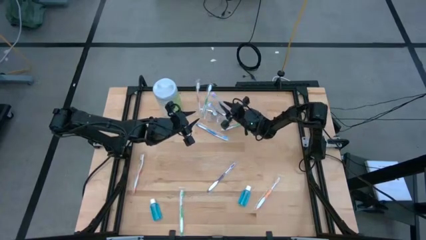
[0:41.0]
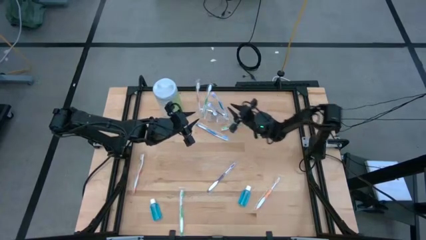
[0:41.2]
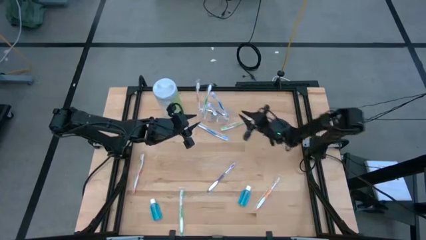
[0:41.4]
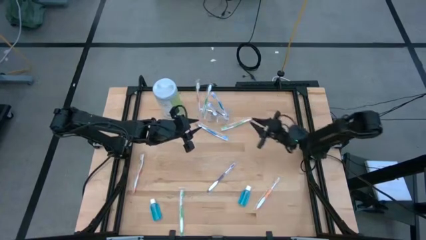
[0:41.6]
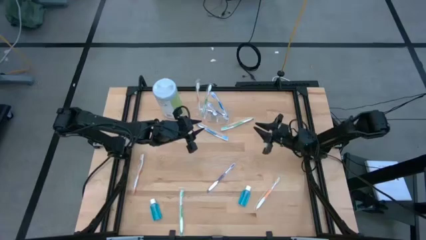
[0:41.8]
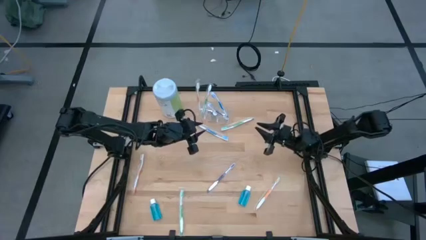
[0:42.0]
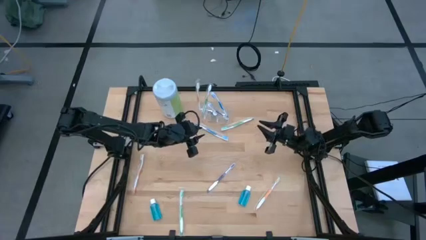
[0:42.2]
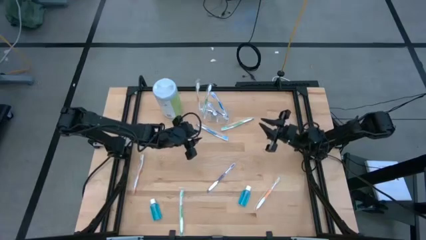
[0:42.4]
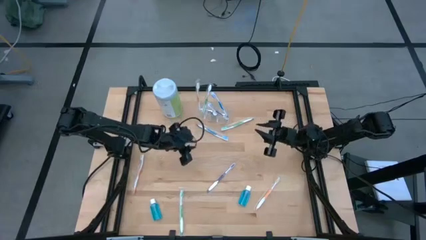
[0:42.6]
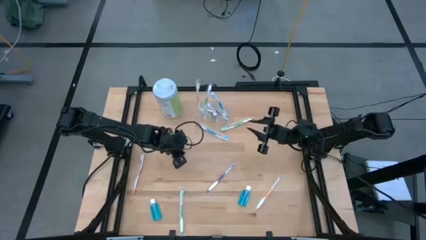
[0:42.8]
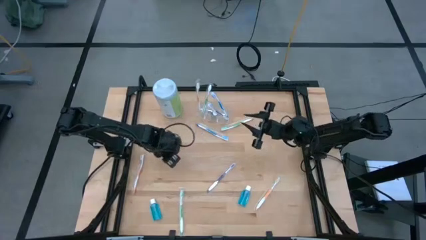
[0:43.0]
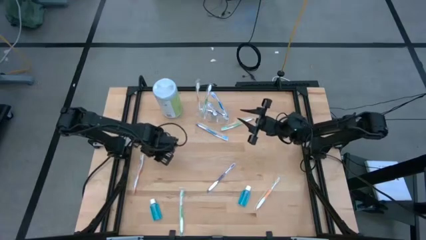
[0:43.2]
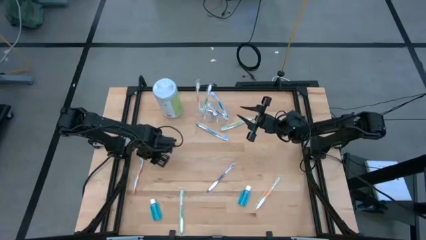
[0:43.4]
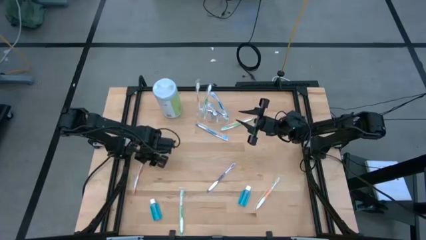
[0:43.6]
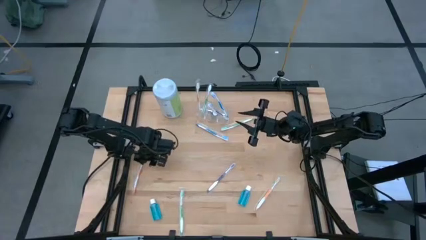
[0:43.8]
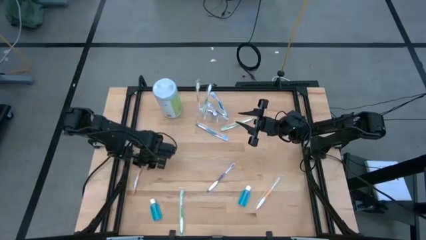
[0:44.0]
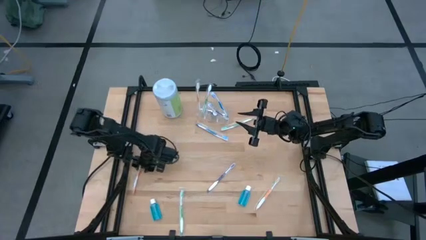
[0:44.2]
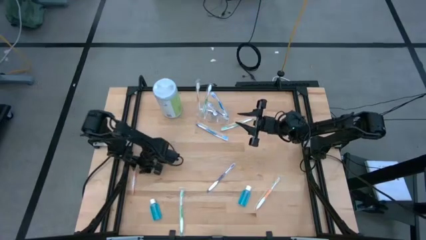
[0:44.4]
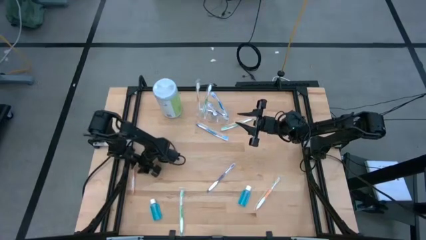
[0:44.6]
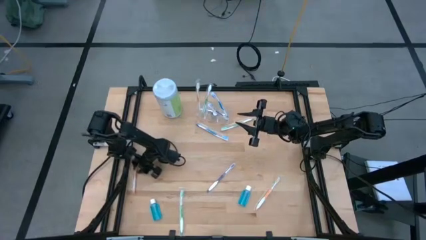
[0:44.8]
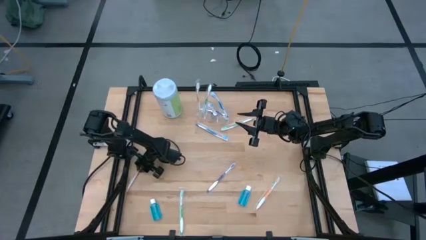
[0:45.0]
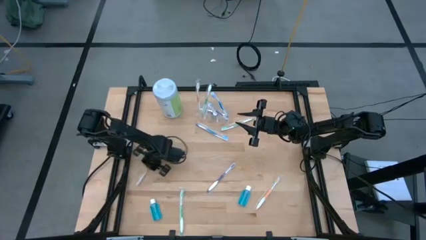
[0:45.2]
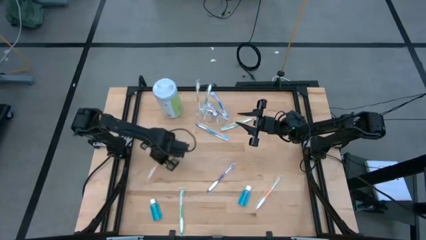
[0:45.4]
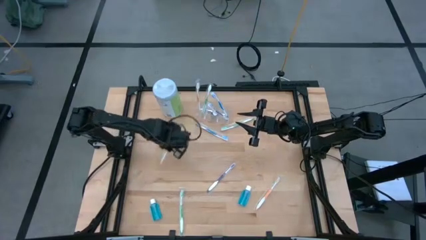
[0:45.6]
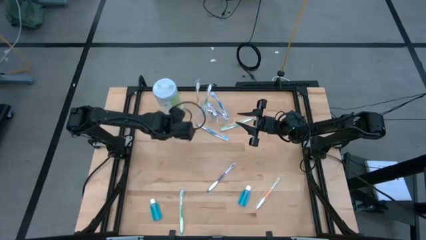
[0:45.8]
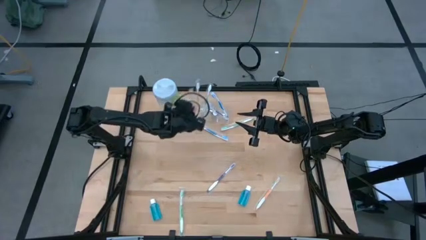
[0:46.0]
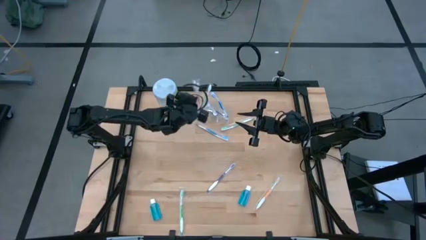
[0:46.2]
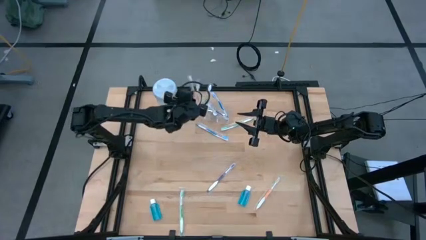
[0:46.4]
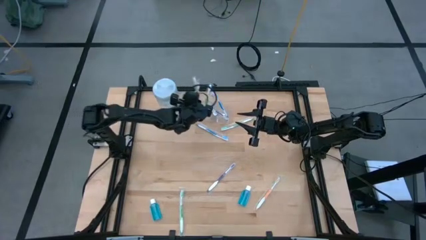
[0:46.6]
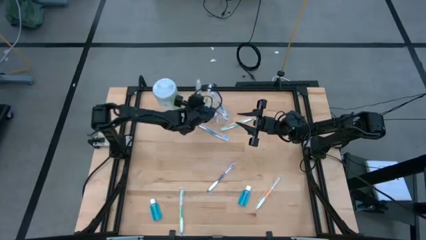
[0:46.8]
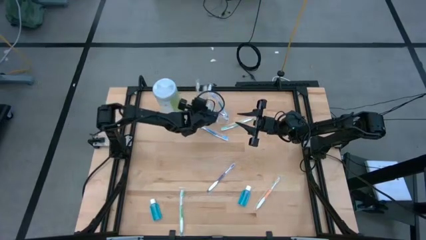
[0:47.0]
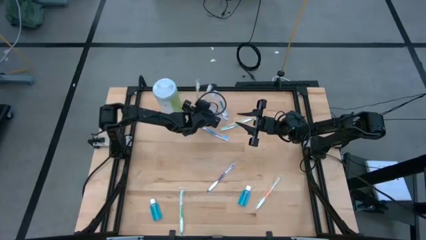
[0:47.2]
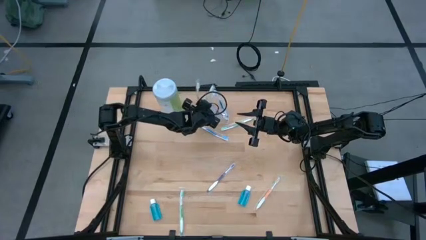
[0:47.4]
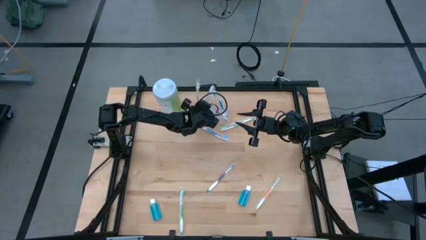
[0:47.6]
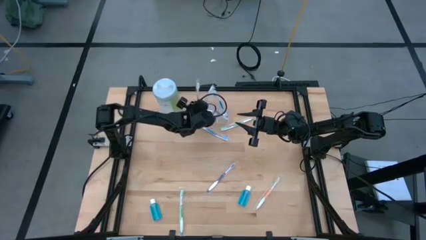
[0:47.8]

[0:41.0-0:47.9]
Task: Pick & Place toothbrushing station
Put the left orange toothbrush into the transparent organizer

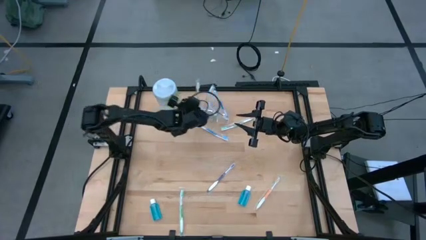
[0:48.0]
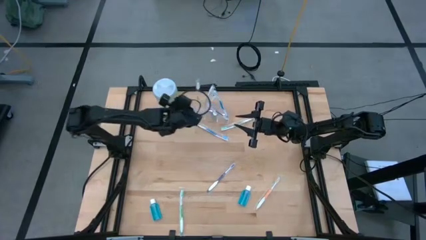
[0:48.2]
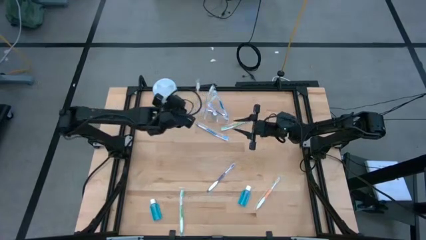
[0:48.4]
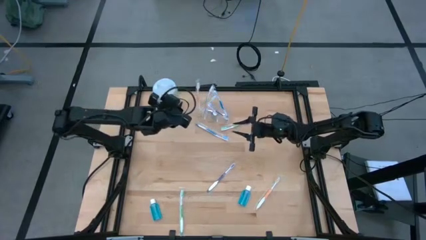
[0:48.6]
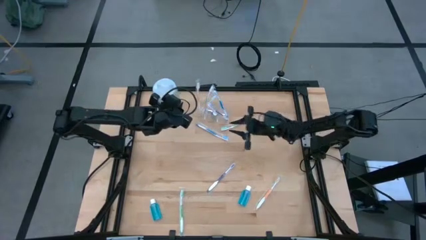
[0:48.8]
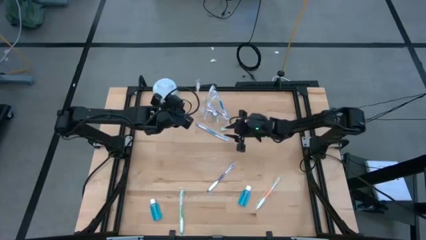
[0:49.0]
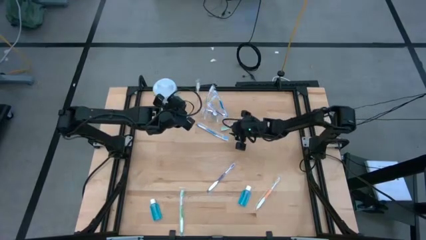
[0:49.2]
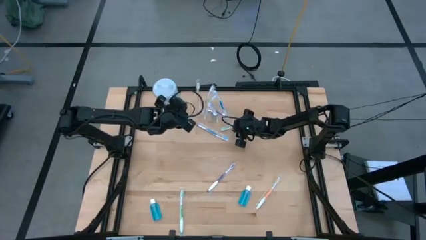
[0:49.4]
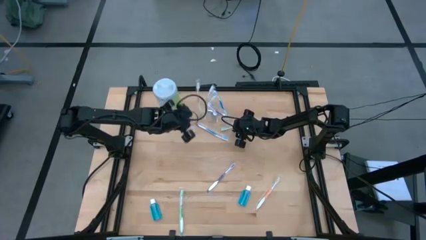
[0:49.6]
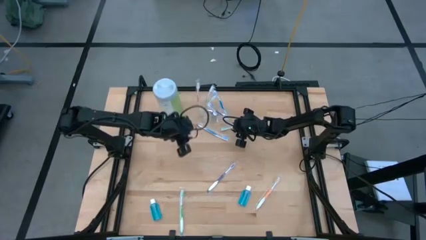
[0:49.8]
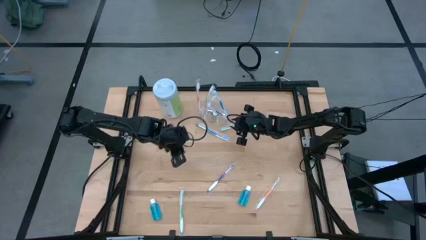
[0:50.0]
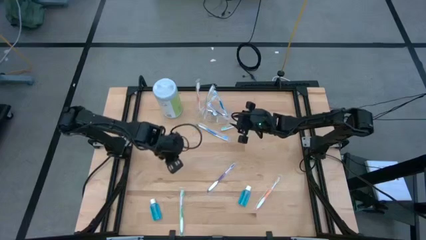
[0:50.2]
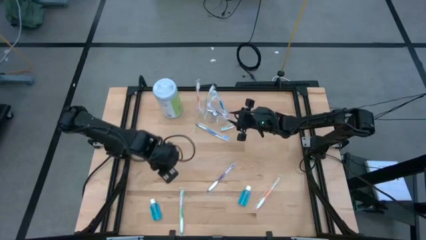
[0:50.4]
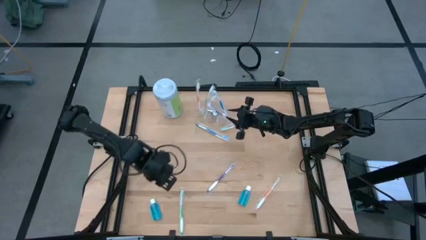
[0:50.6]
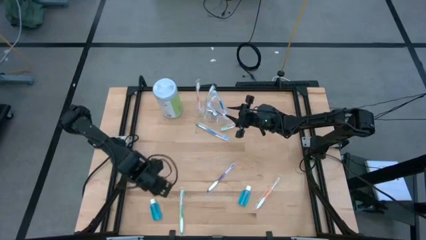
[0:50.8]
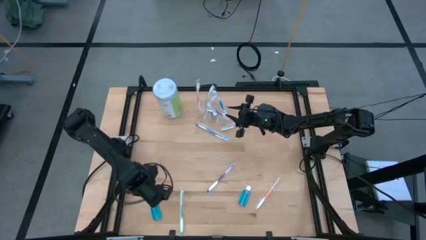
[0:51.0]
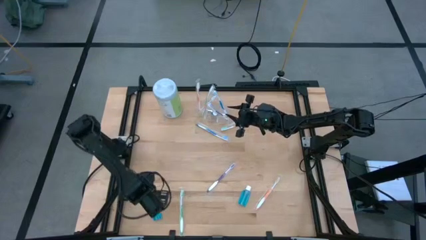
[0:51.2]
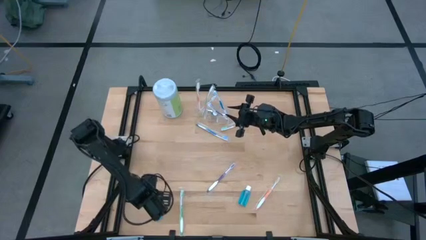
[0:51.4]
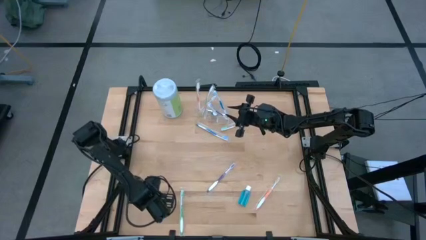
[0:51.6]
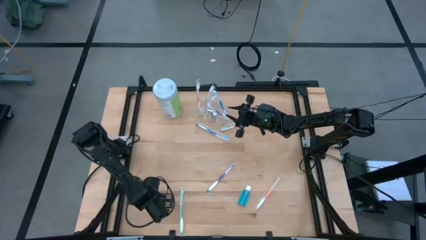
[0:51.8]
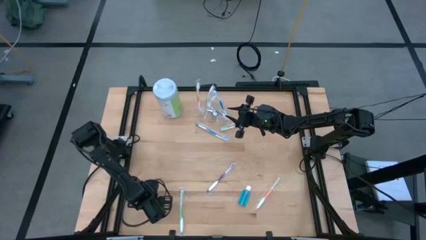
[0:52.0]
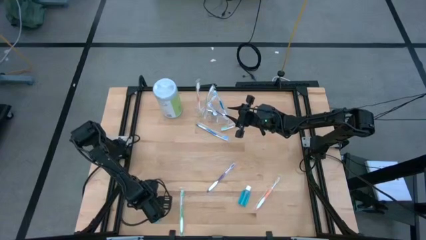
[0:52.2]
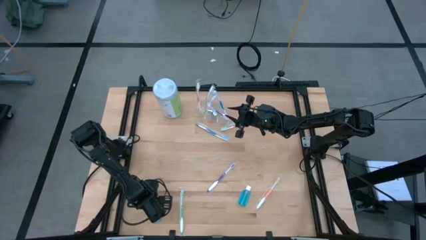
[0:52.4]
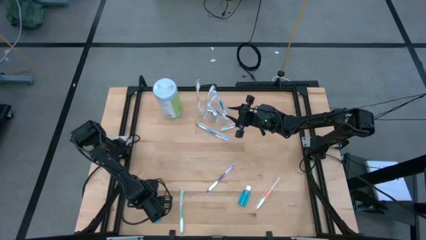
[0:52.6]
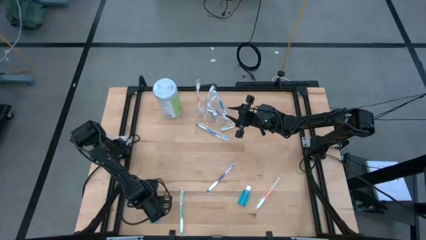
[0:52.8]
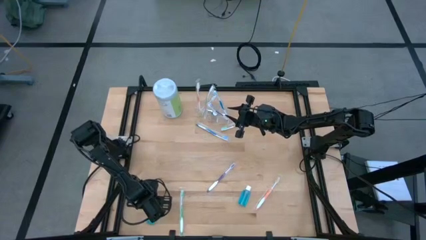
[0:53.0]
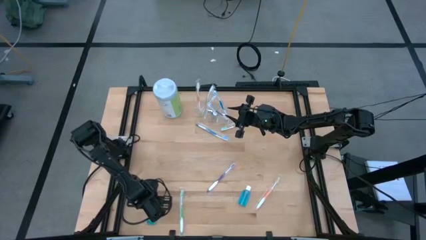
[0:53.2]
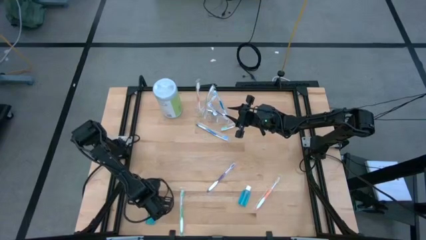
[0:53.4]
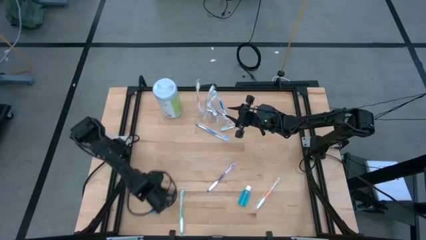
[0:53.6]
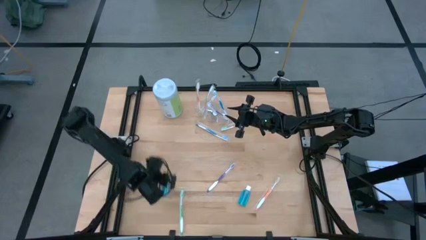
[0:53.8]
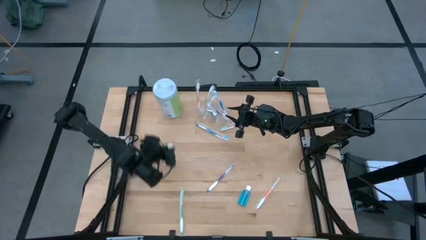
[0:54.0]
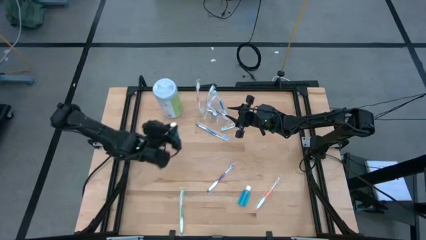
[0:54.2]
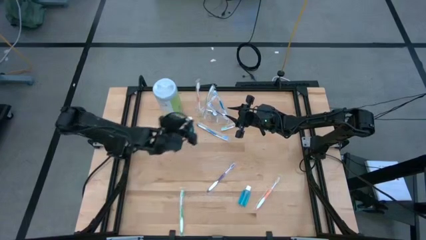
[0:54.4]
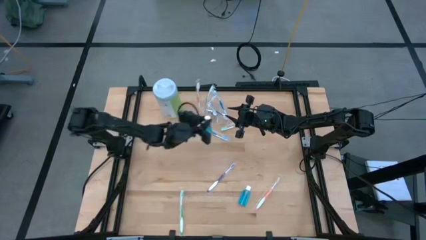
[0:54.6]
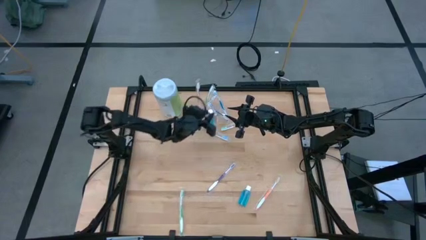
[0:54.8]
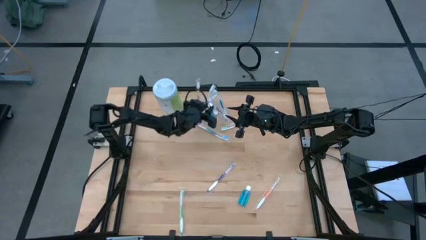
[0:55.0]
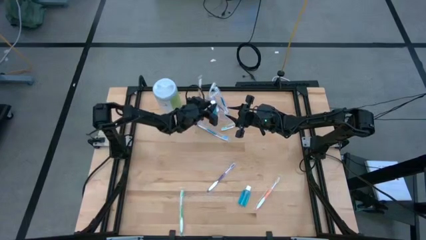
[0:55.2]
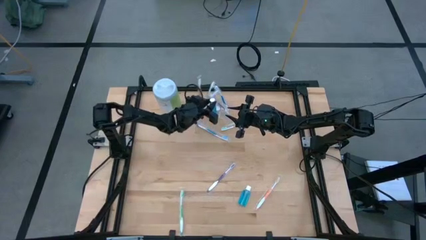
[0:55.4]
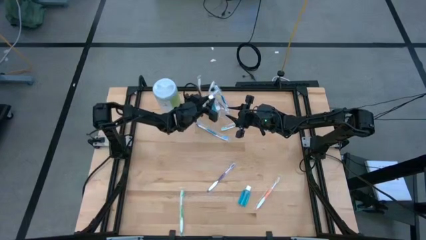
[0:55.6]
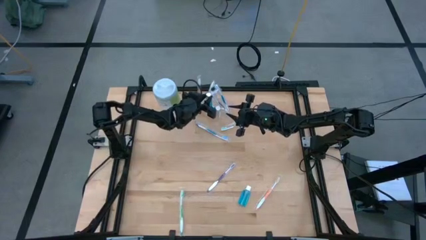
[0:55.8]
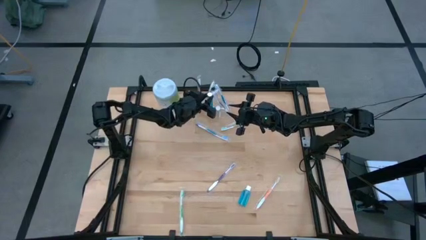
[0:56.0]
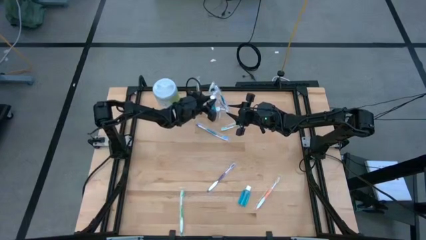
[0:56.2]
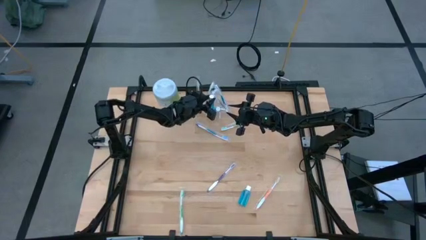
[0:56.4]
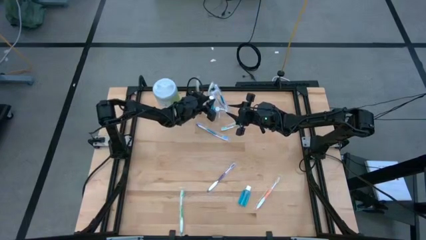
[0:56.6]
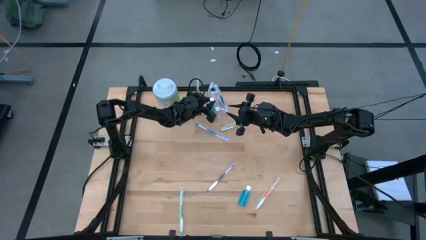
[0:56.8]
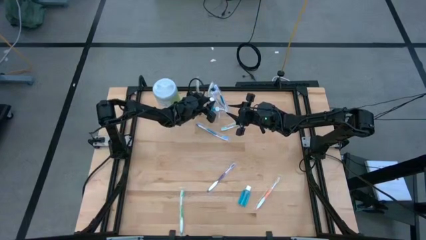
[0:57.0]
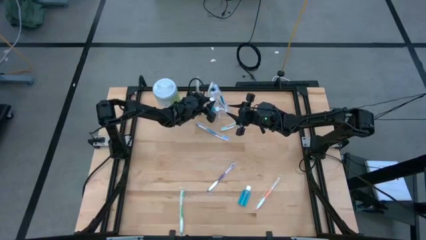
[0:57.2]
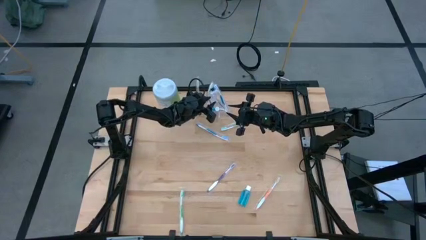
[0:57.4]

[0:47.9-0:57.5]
Put the left blue mouthwash into the transparent organizer
